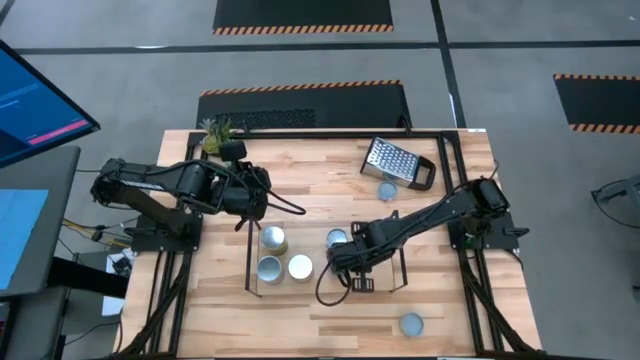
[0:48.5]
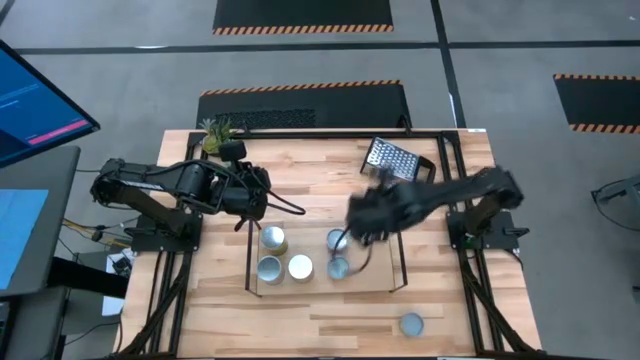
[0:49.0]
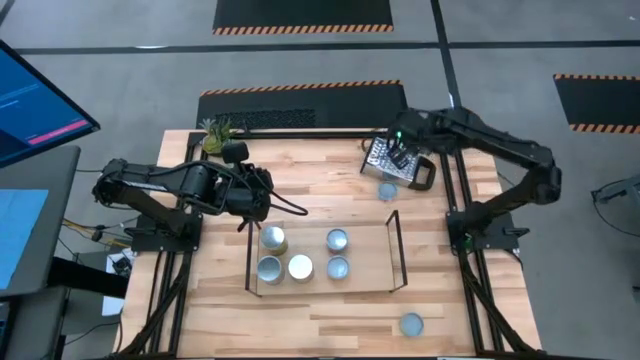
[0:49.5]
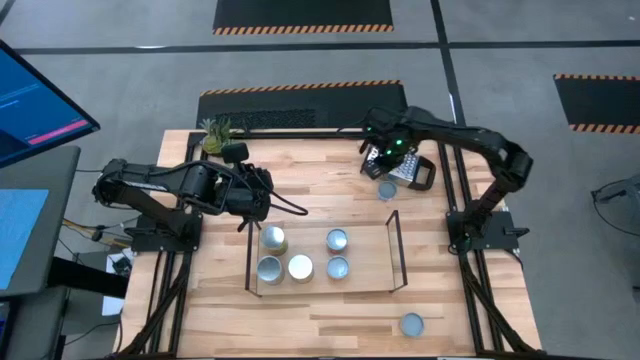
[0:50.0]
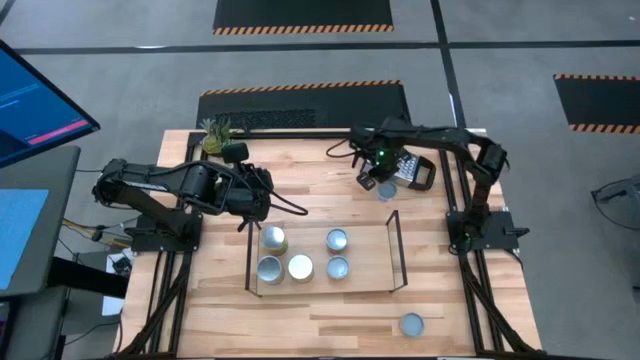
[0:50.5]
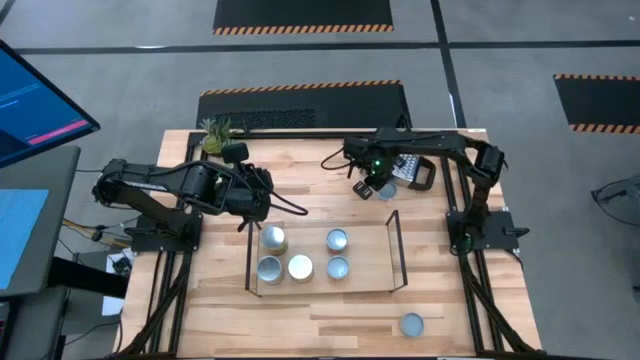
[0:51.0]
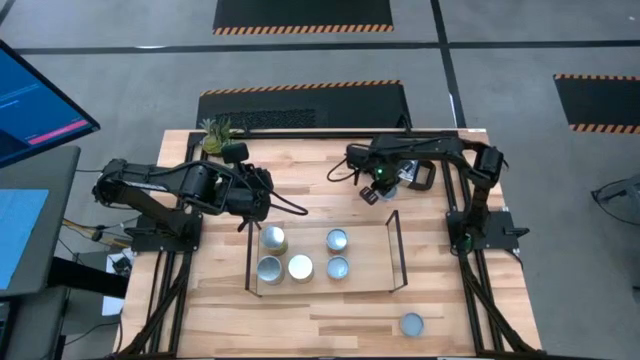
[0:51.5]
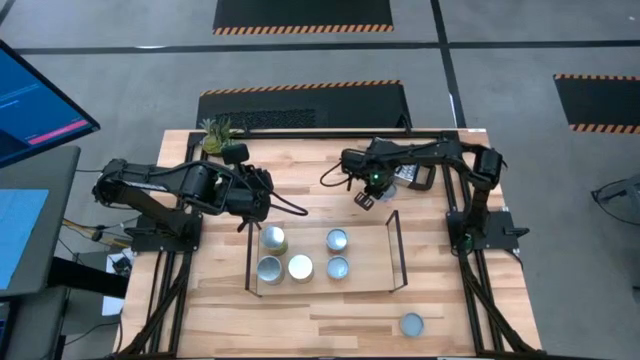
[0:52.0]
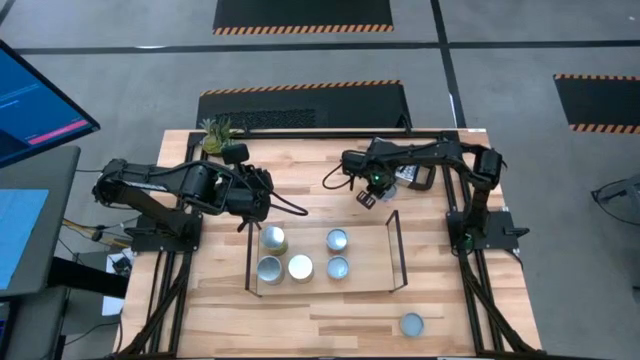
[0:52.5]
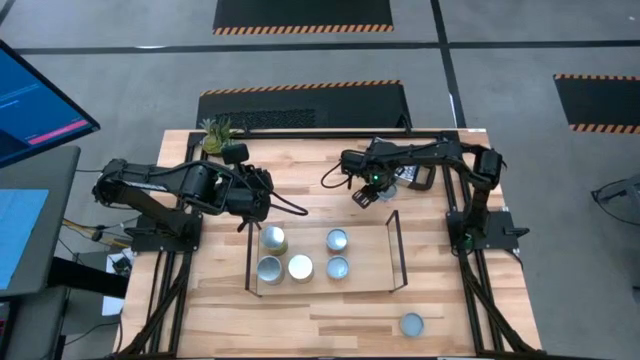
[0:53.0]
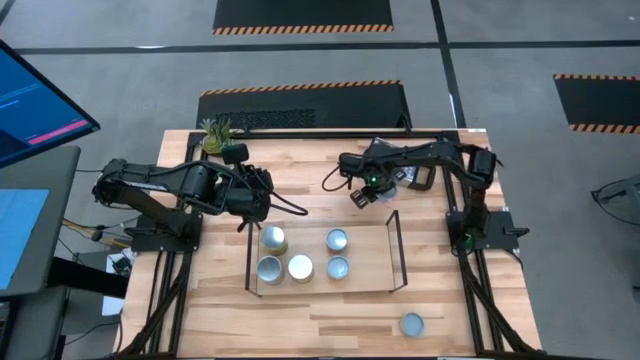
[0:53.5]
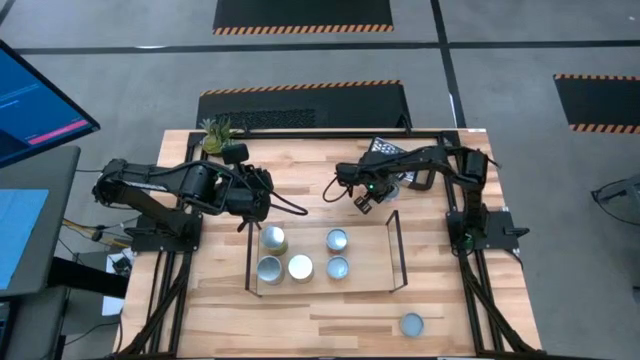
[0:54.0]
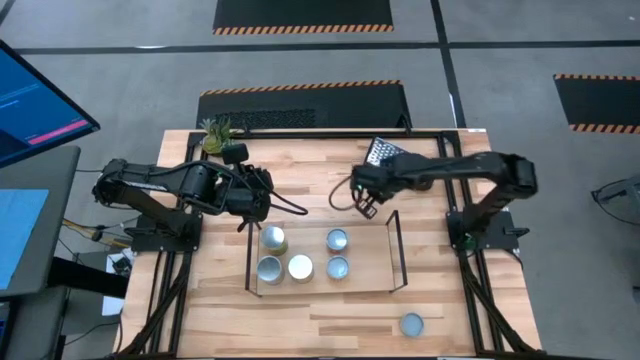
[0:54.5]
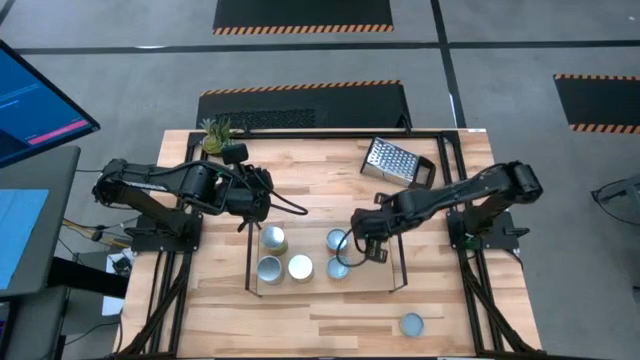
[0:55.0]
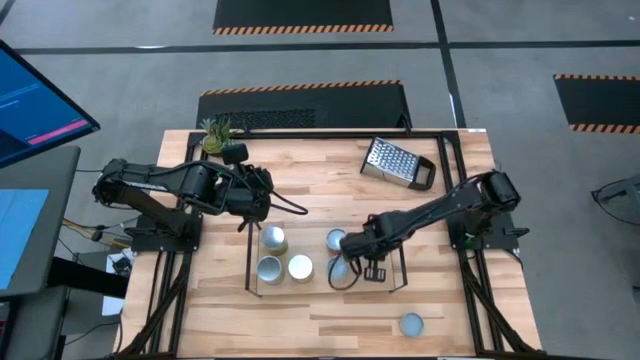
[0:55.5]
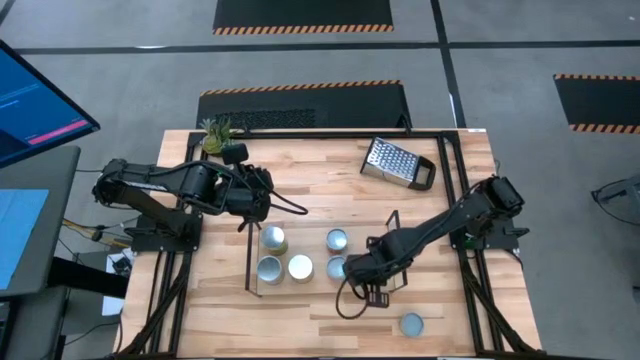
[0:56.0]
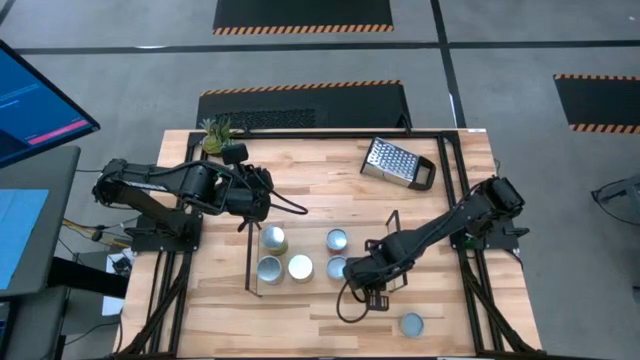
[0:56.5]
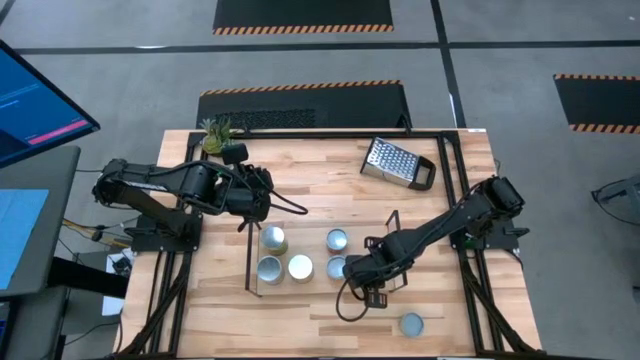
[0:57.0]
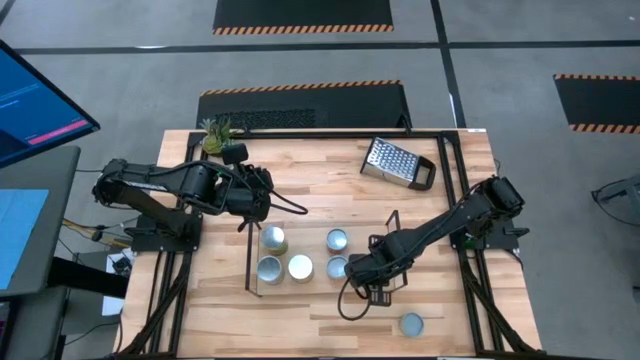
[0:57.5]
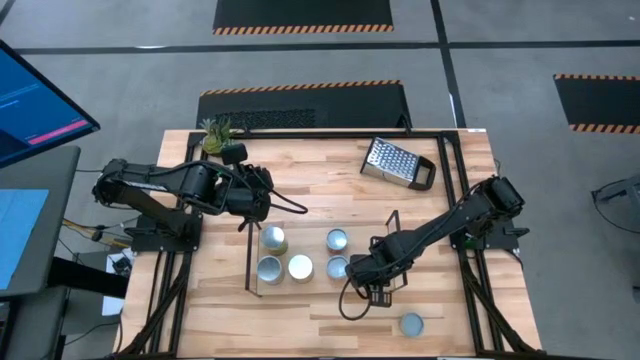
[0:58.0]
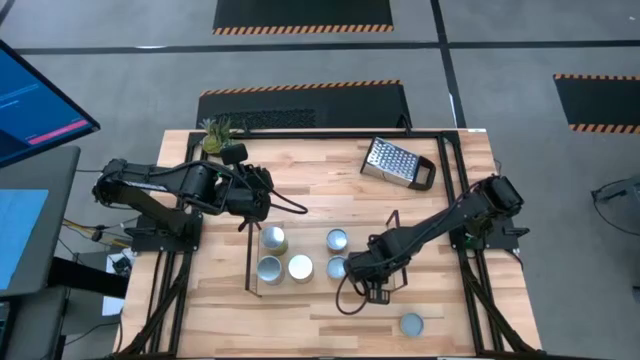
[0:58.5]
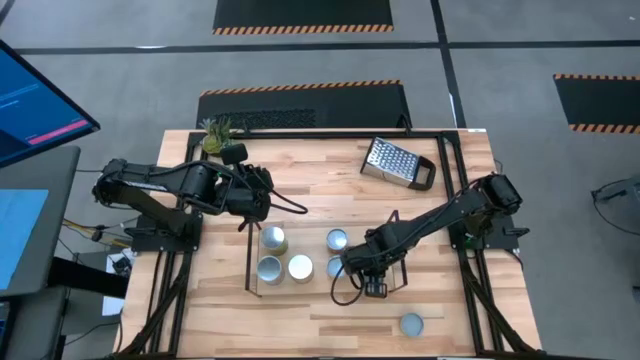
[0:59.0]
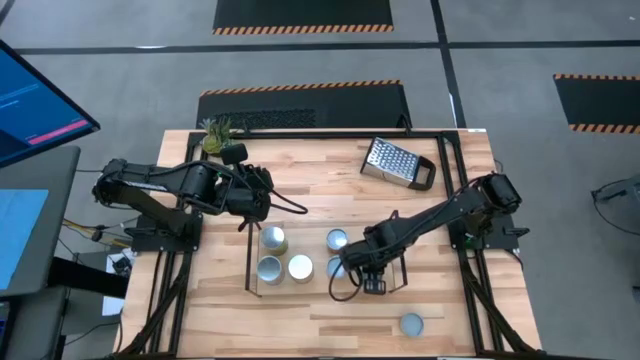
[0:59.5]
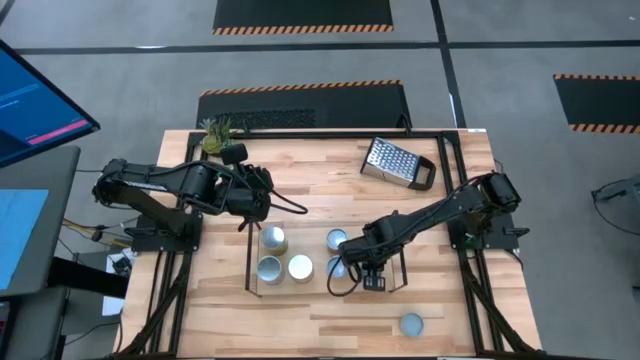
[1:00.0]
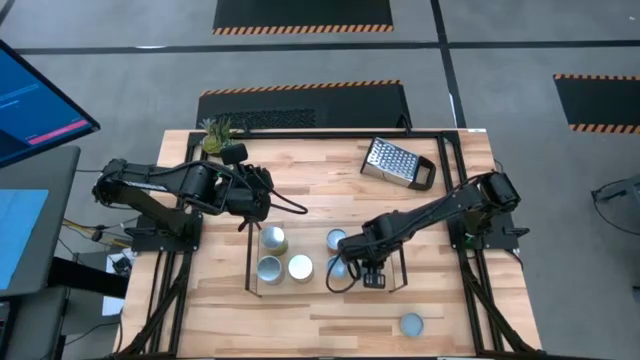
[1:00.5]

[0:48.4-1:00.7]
Task: Pick and place cans onto a shelf
Put the canned salmon on the shelf

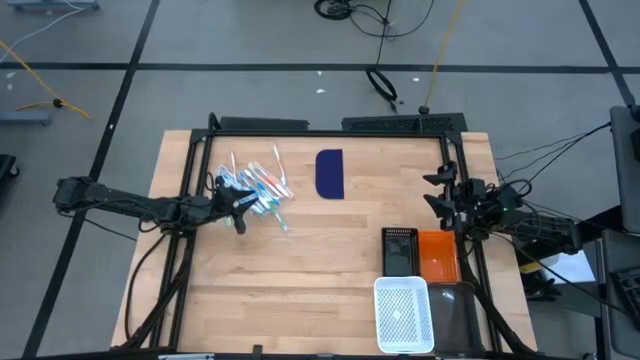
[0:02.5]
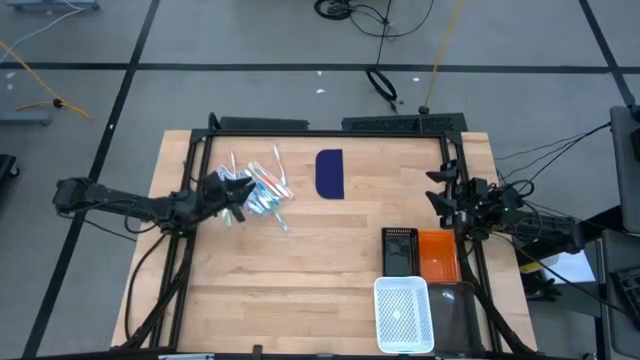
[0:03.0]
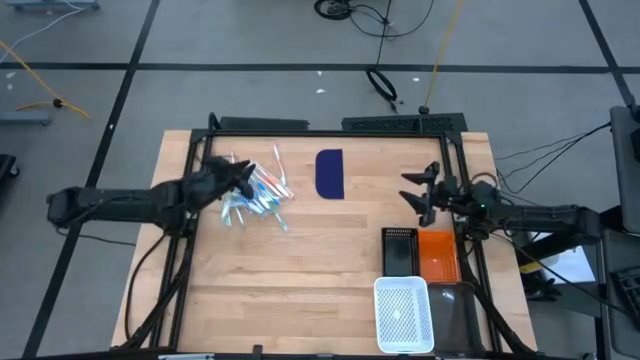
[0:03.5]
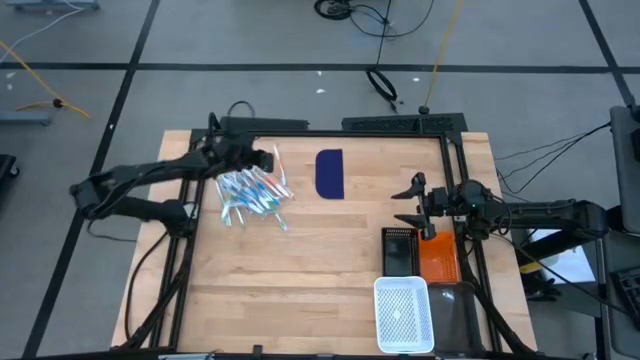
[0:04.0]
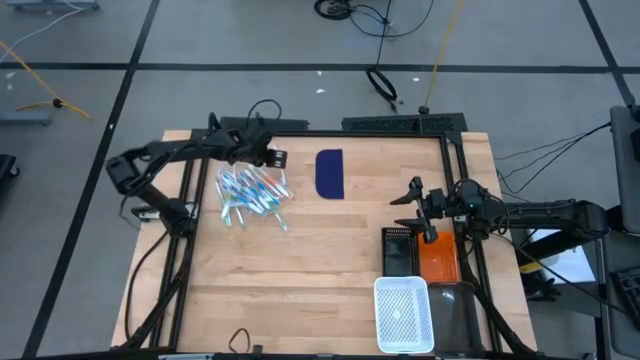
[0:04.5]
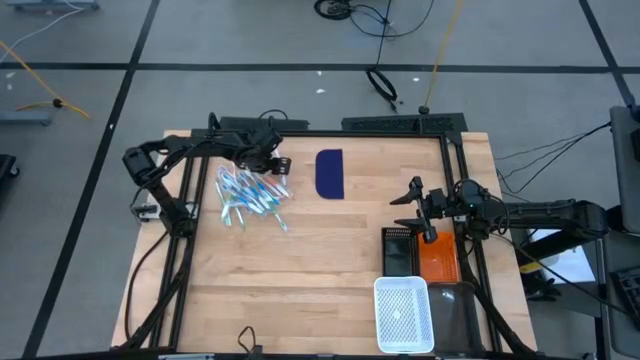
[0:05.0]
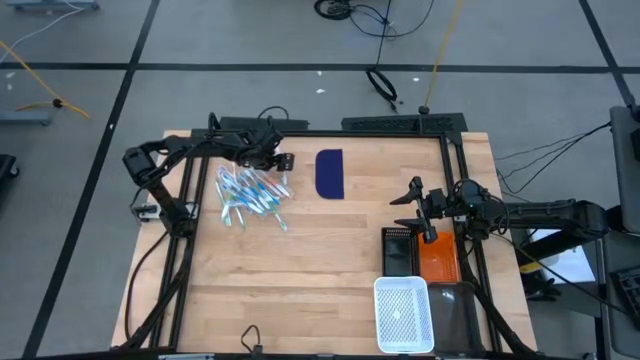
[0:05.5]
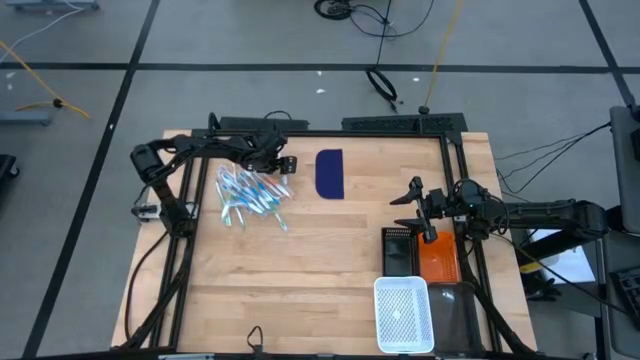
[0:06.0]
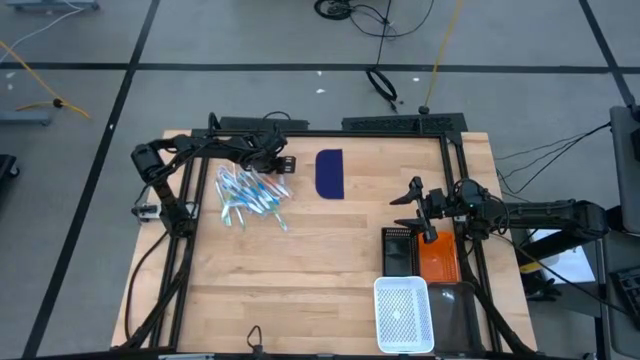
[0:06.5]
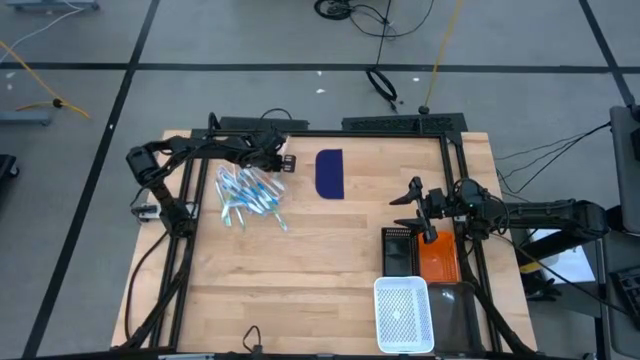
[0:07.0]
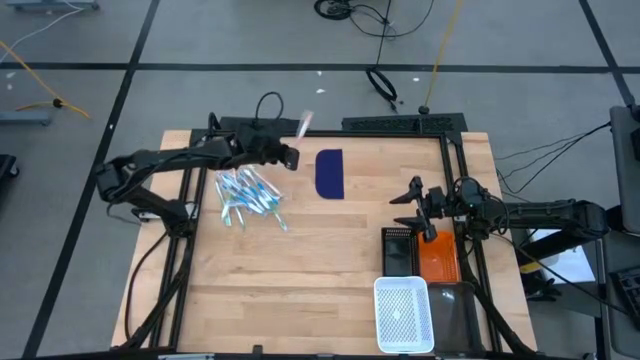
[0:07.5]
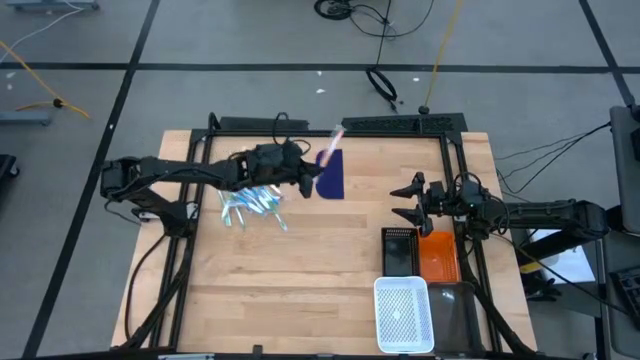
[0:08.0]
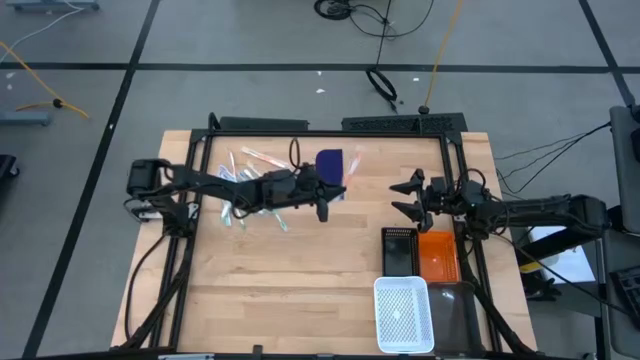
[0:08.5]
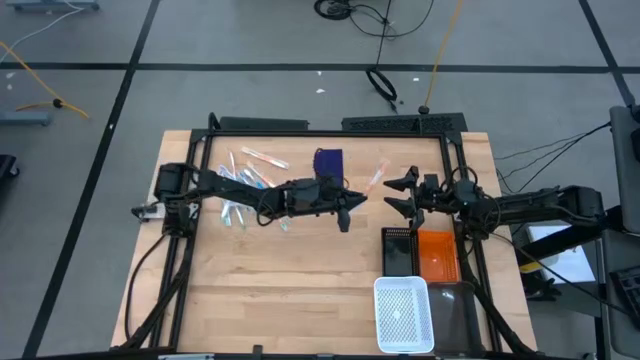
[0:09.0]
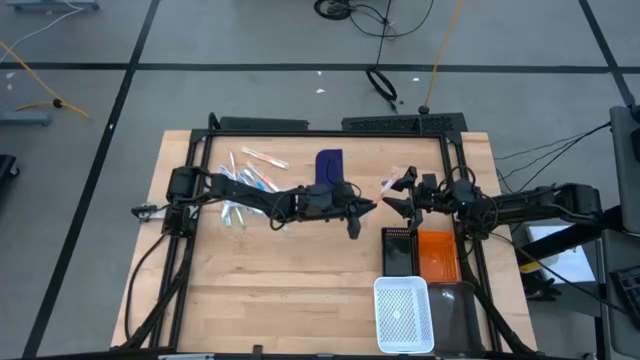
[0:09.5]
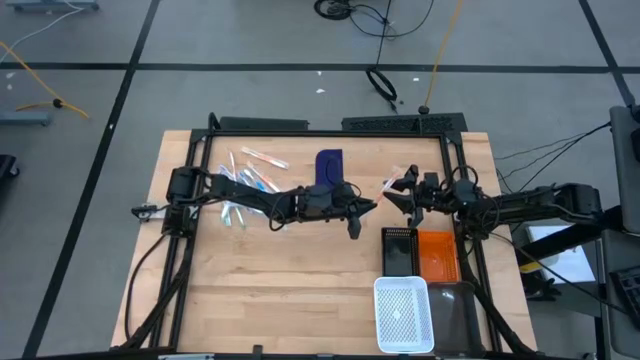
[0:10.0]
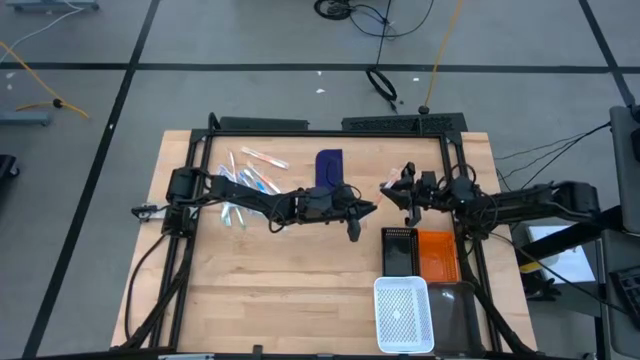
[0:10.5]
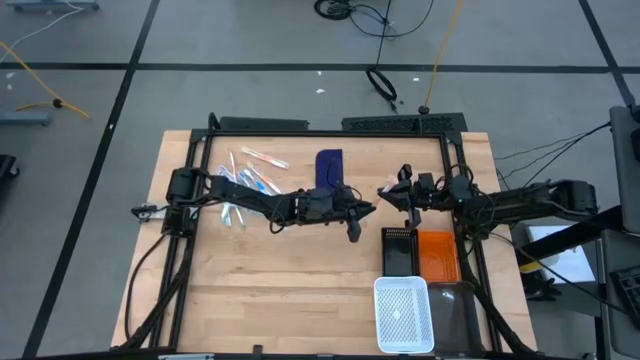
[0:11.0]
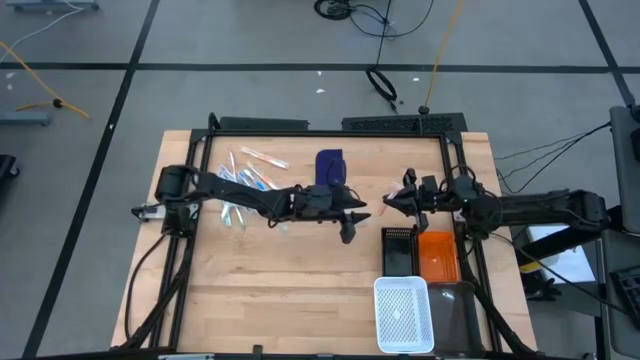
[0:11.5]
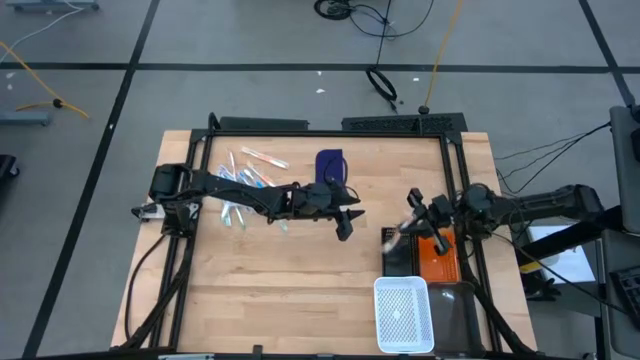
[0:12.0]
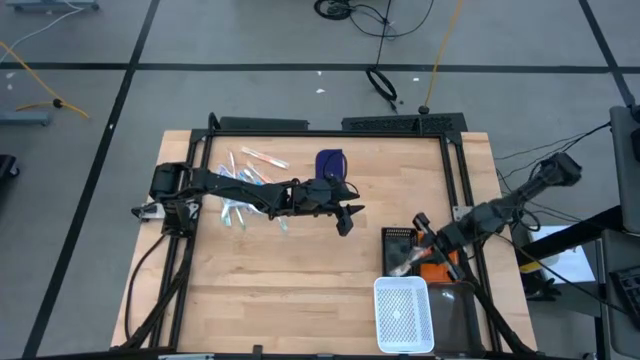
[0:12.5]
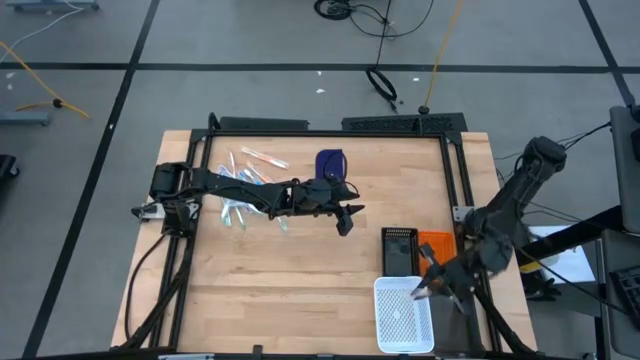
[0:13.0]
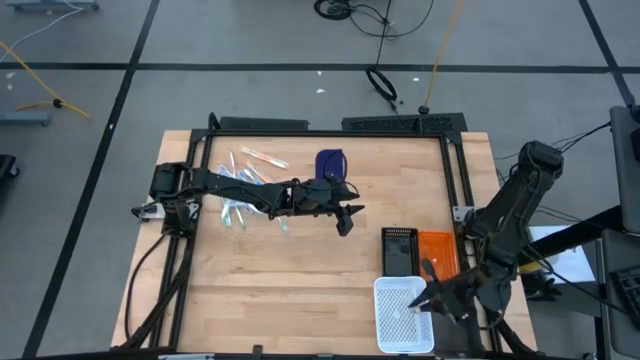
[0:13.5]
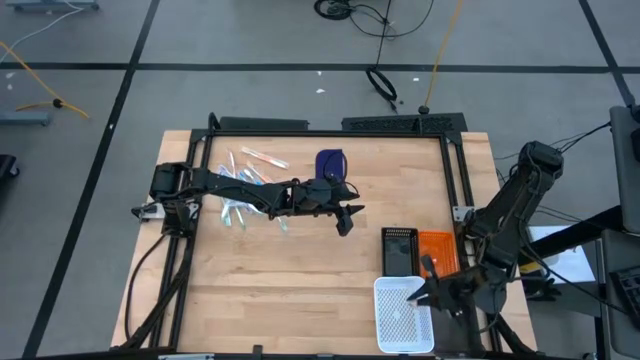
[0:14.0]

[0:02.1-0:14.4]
Task: Pick & Place Toothbrushes
Put the orange toothbrush into the white bin
